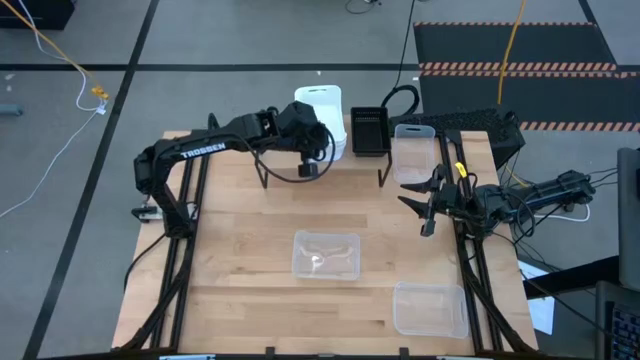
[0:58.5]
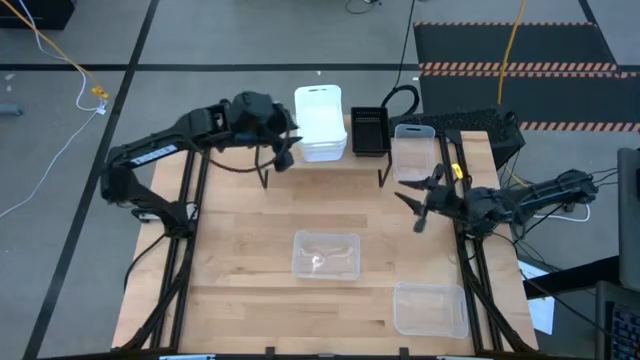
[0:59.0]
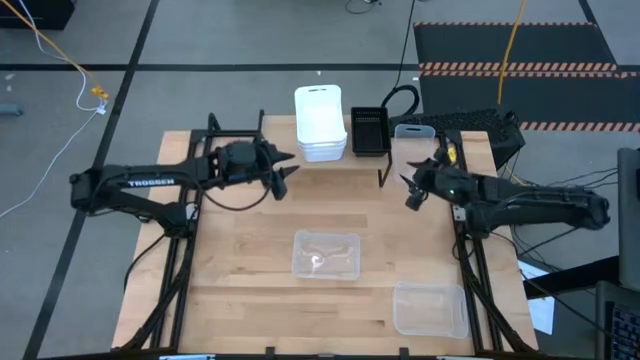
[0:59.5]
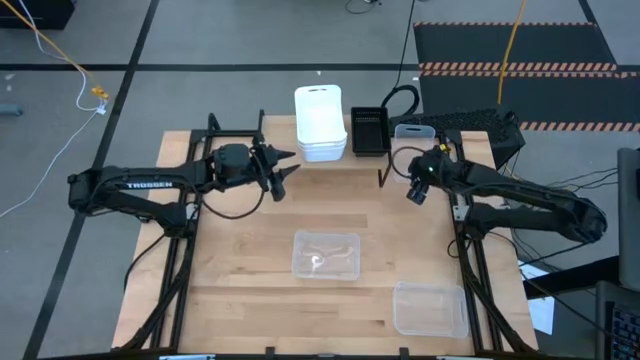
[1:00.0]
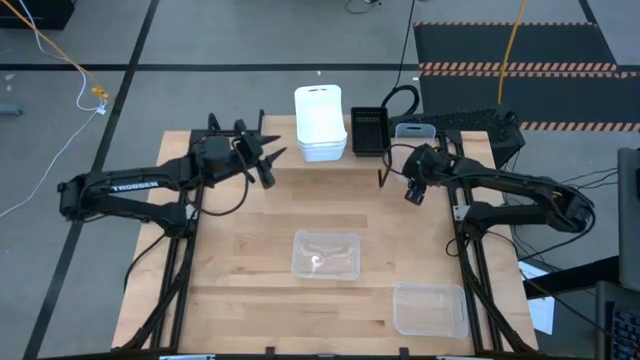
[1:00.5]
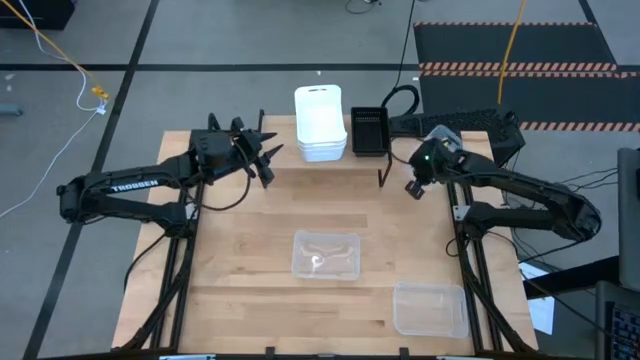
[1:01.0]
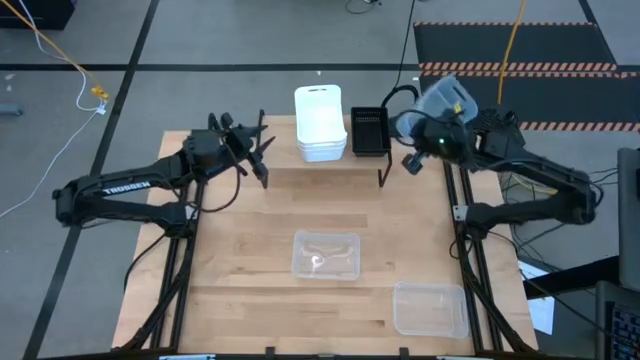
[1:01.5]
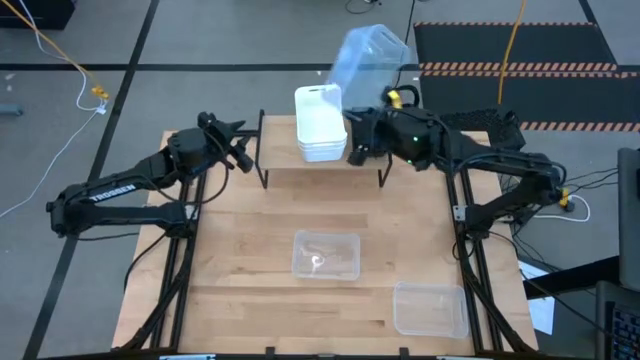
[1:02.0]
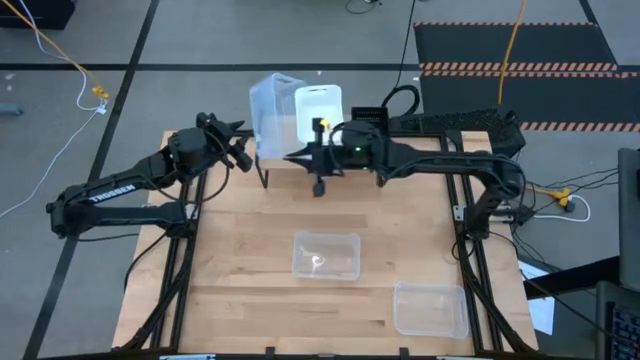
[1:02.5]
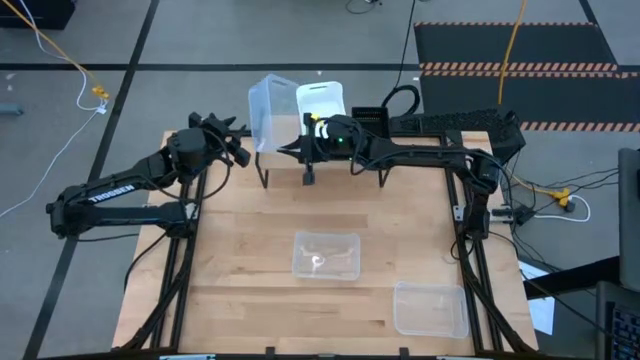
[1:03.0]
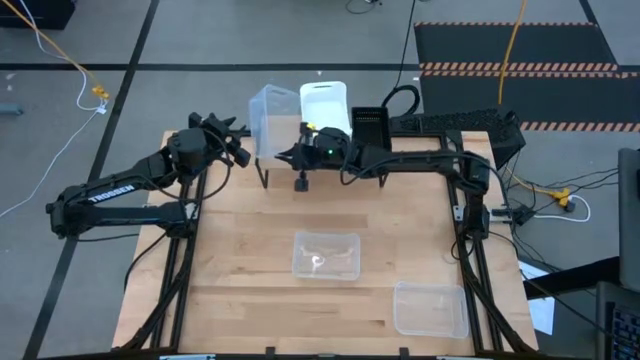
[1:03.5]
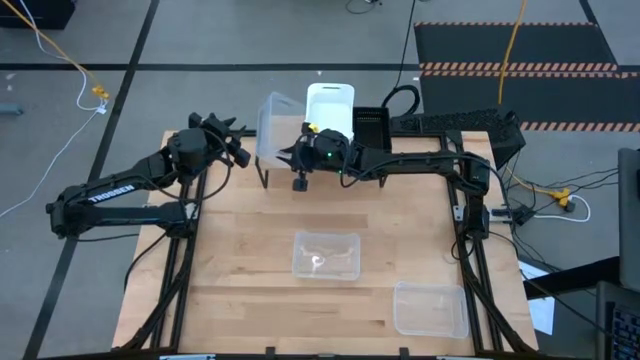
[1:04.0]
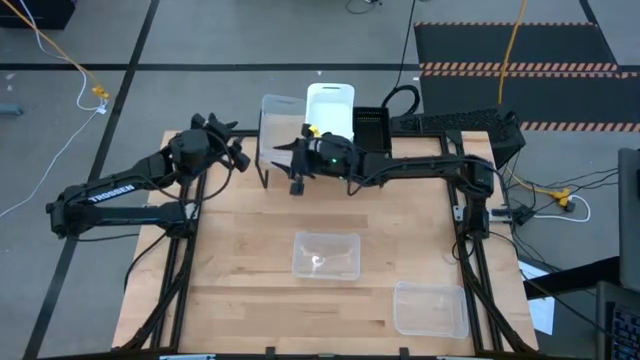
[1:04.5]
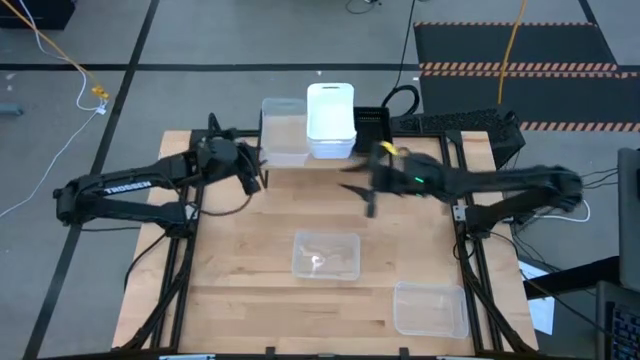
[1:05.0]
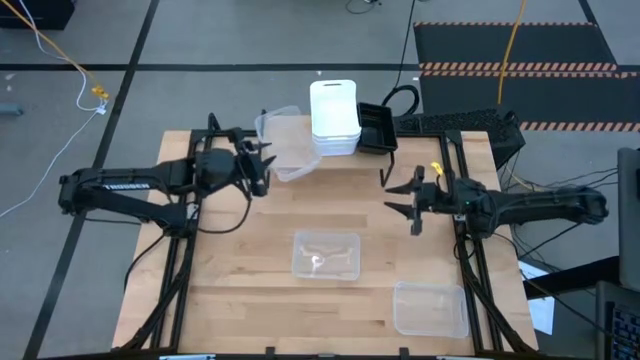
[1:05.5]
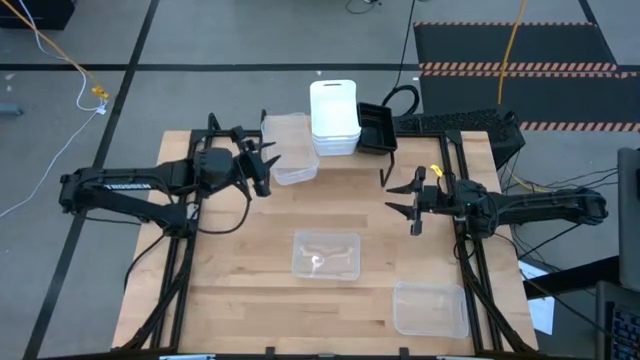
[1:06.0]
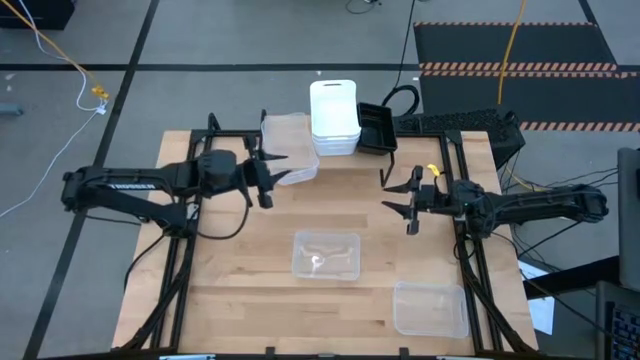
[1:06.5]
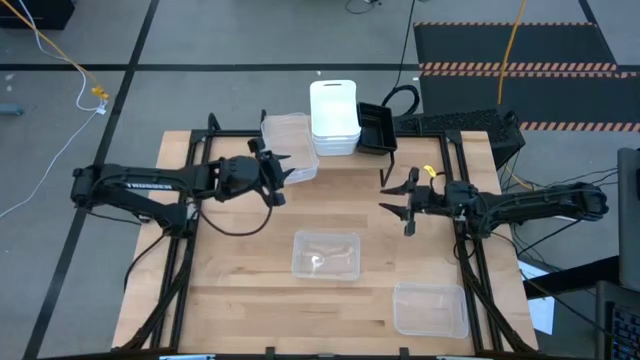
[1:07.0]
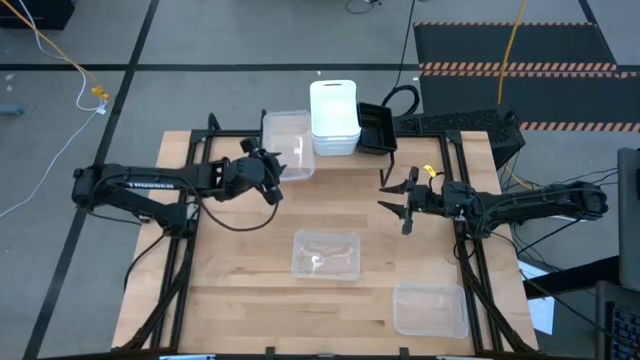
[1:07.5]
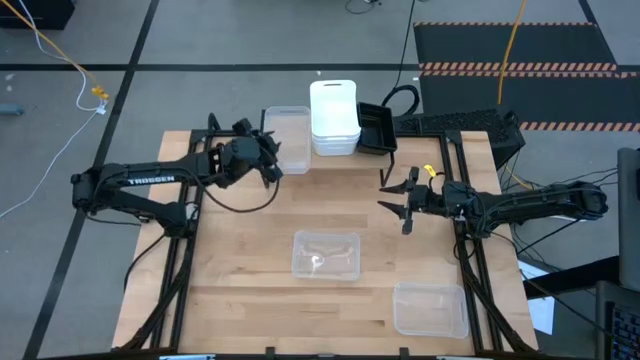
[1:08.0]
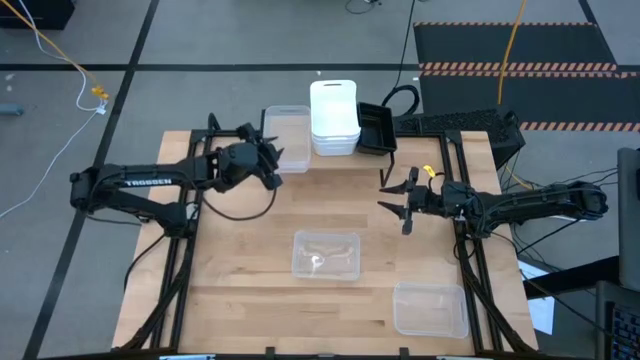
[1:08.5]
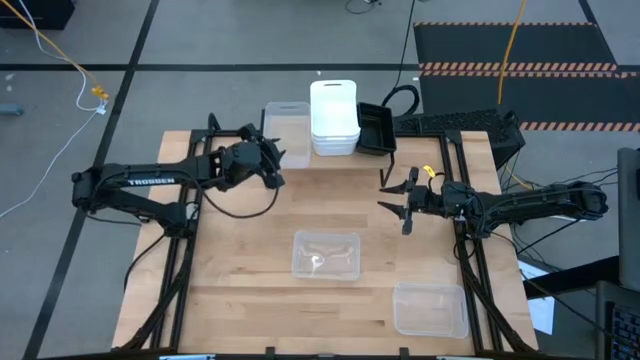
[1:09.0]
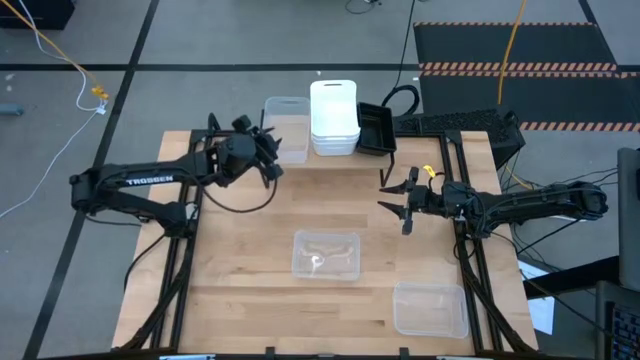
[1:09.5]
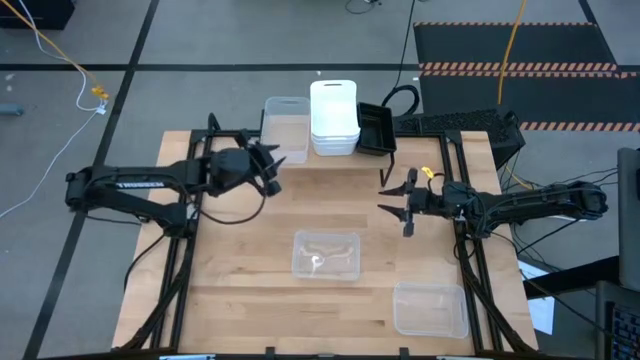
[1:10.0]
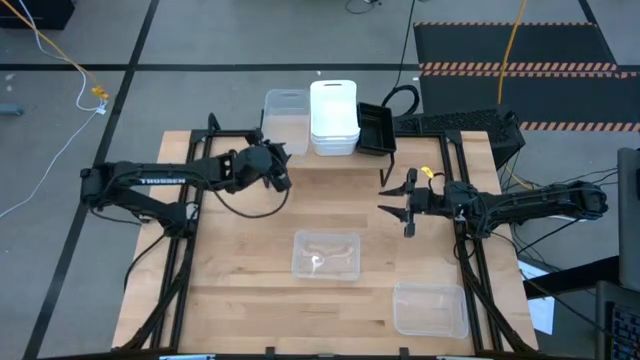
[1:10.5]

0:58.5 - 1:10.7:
Task: Stack baskets on shelf by color
Put the top transparent bin on the shelf

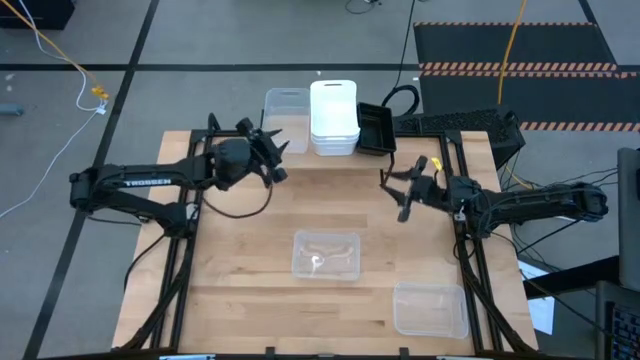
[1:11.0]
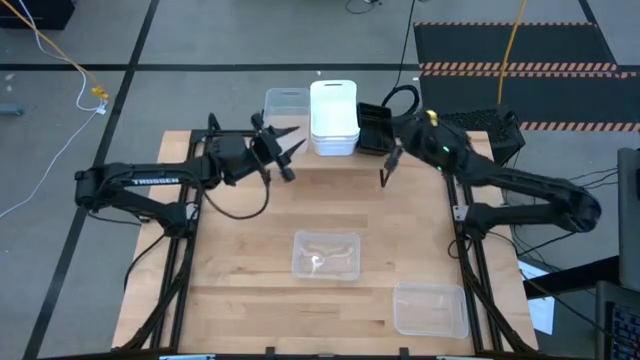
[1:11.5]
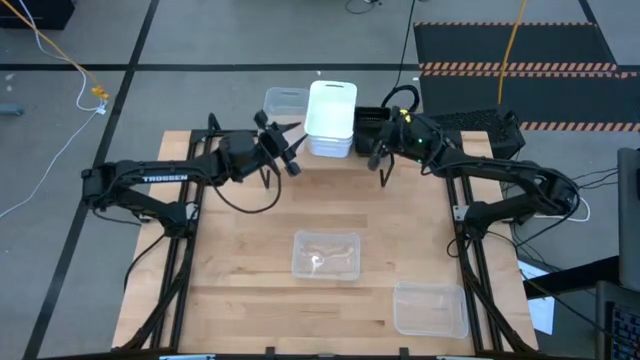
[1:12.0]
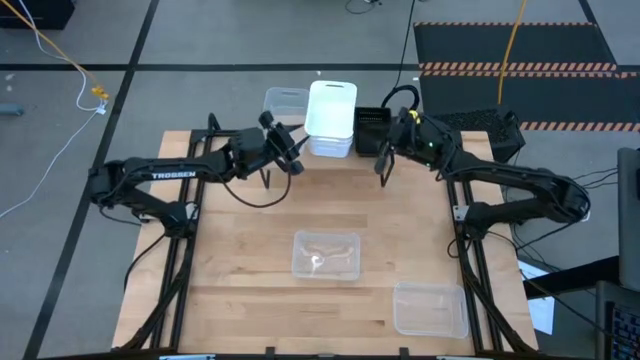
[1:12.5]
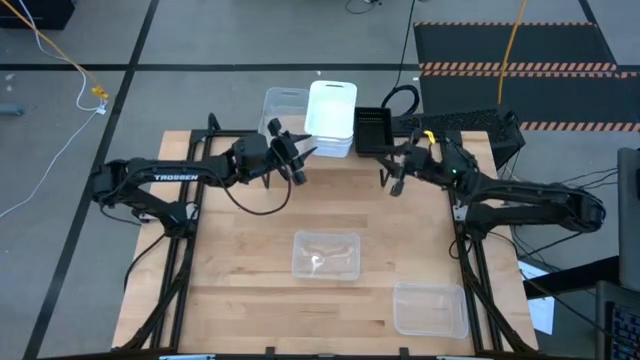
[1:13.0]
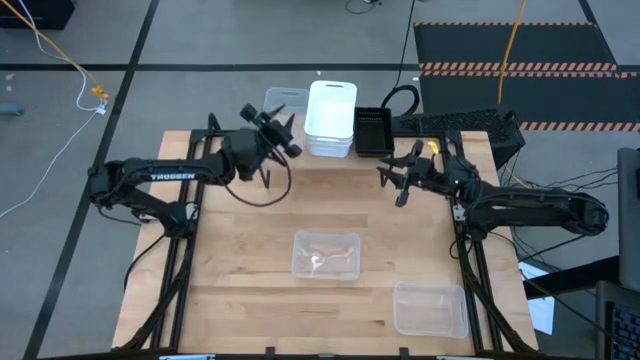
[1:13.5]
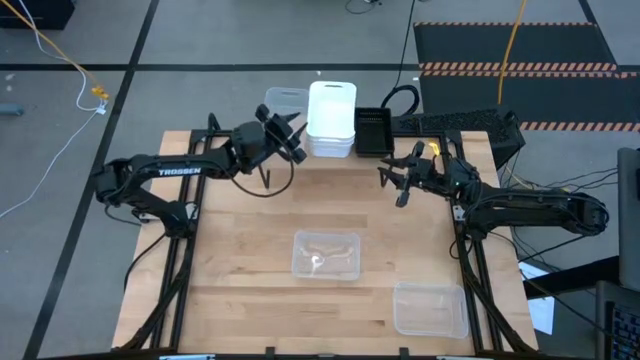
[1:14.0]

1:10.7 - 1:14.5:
Adjust the stacked white bins on the shelf

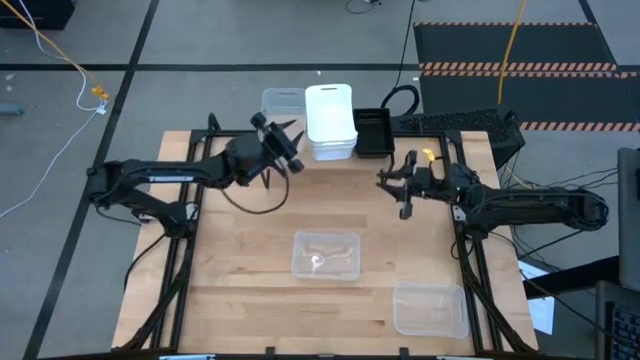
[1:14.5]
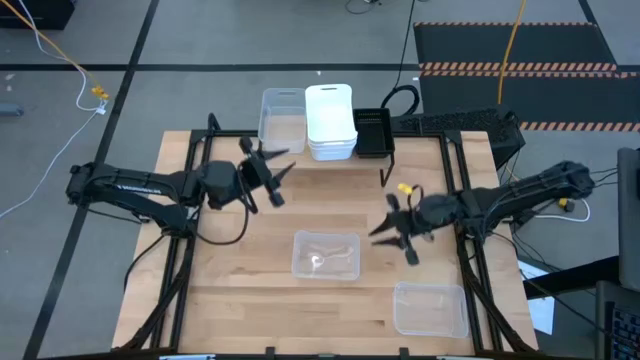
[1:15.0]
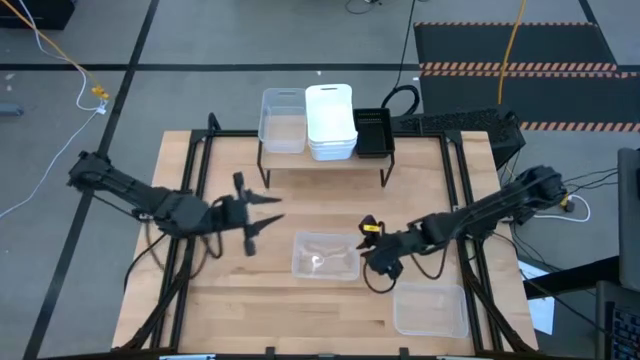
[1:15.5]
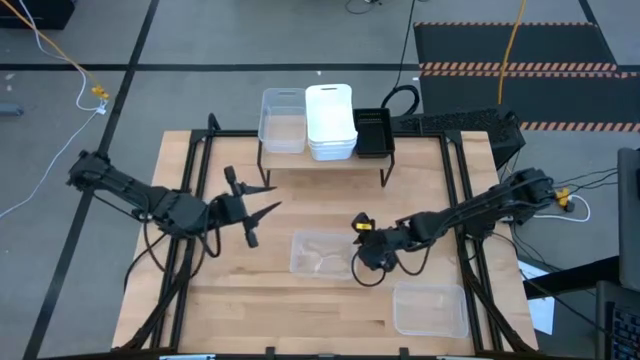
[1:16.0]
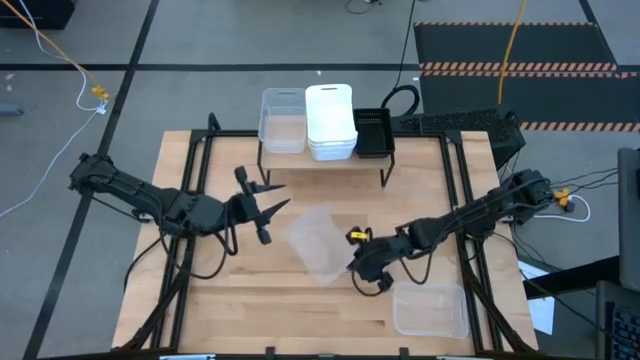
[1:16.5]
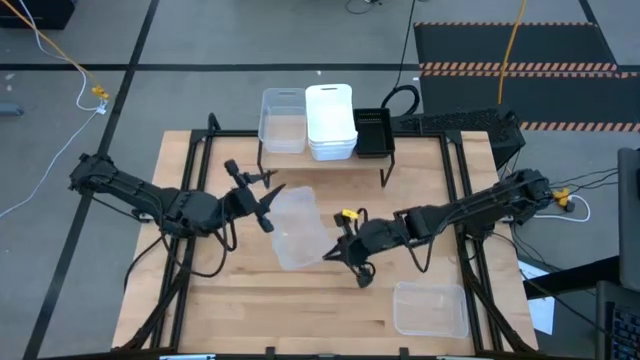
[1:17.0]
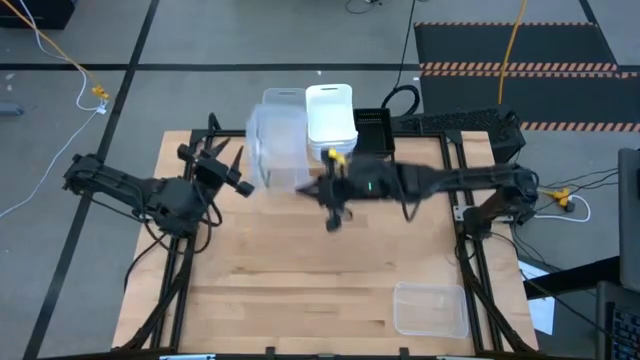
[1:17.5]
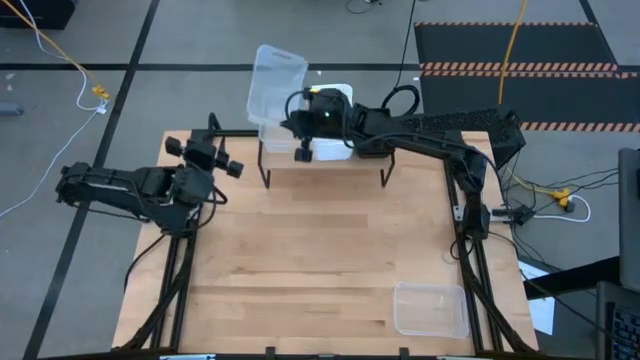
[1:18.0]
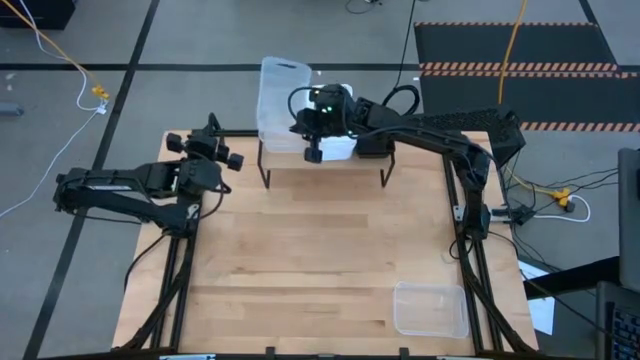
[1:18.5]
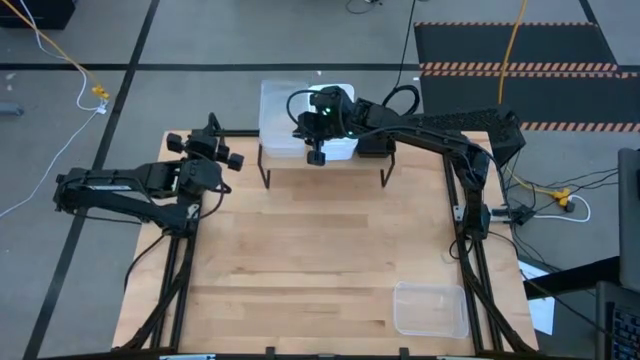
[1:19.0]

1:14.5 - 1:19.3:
Stack the top transparent bin on the transparent bin on the shelf

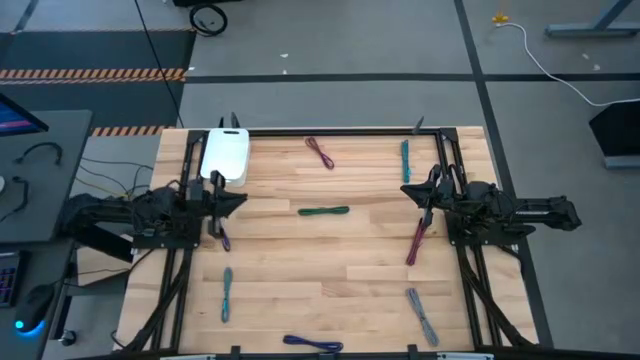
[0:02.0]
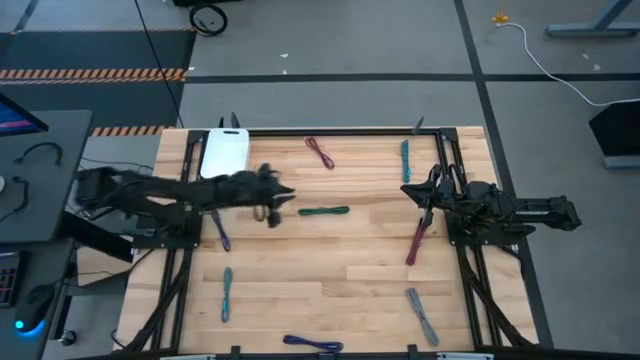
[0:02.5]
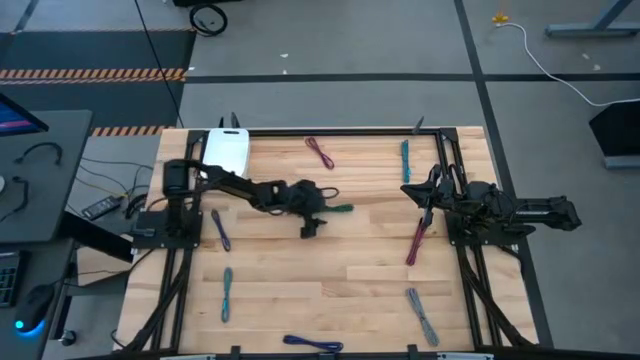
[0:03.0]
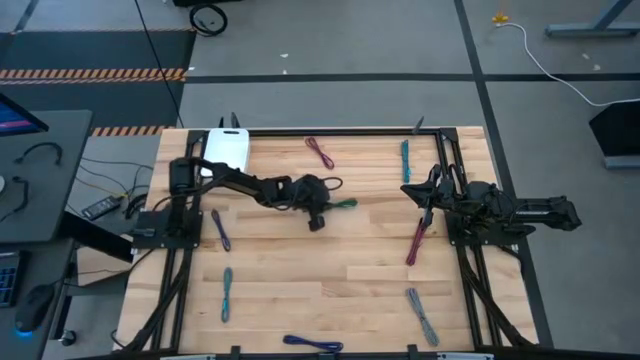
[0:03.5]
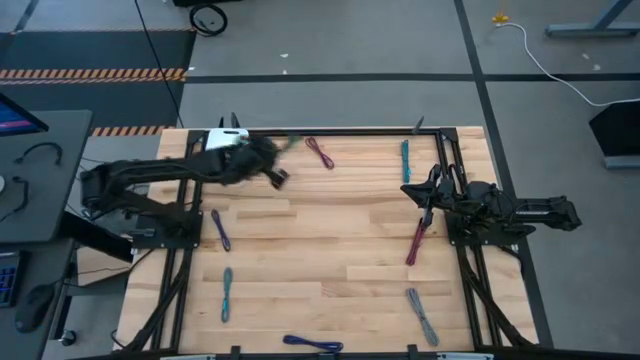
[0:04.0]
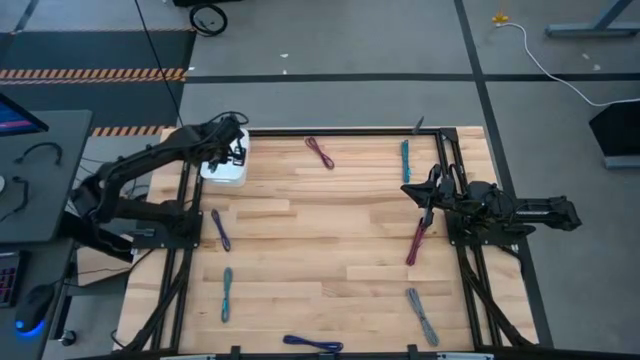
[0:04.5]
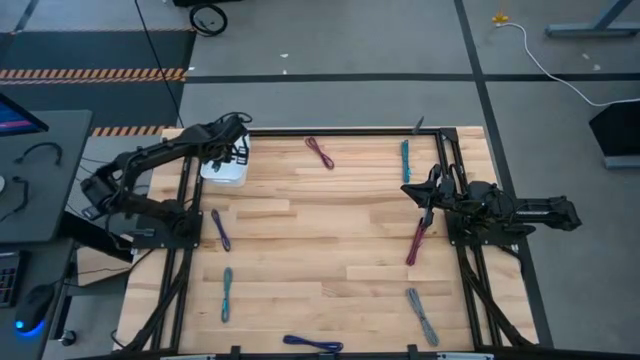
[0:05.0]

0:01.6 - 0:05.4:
Task: Pick and place USB-C Cables
Put the green charger cable into the white bin
